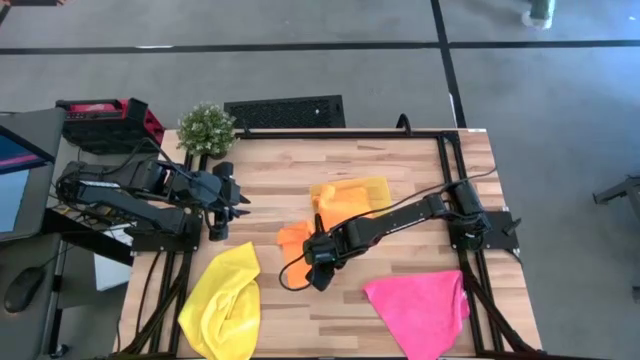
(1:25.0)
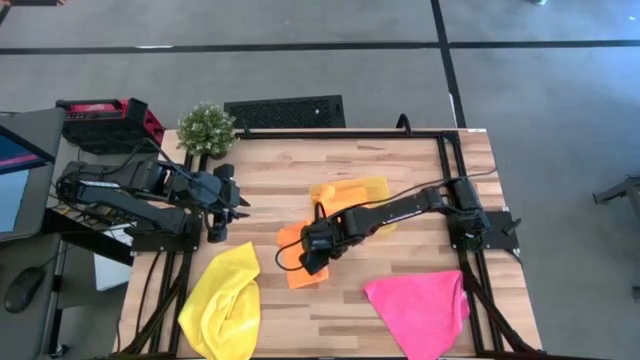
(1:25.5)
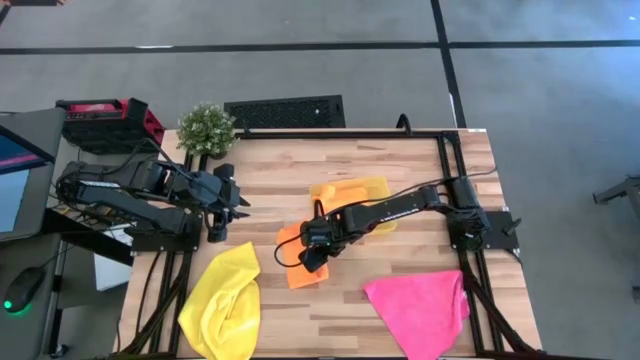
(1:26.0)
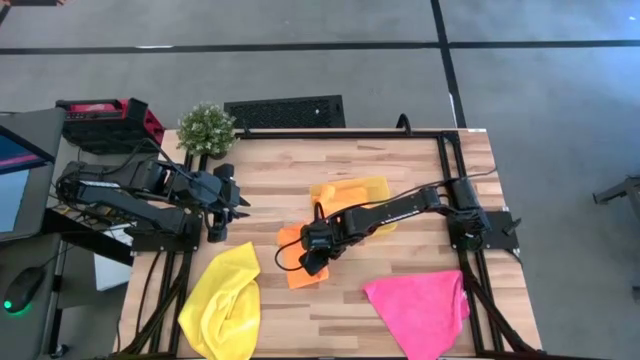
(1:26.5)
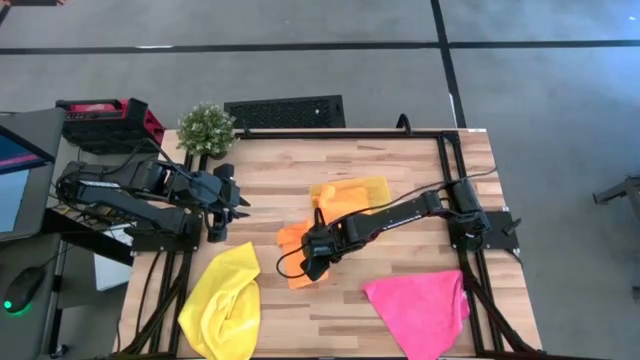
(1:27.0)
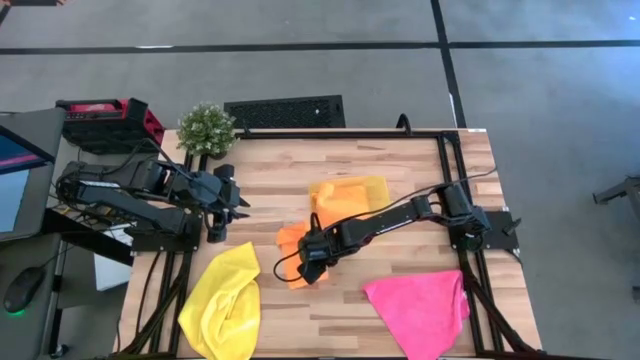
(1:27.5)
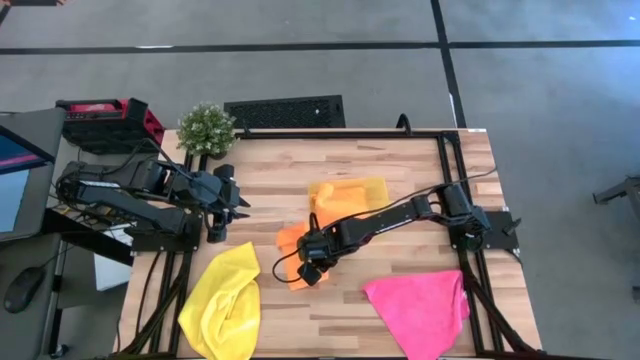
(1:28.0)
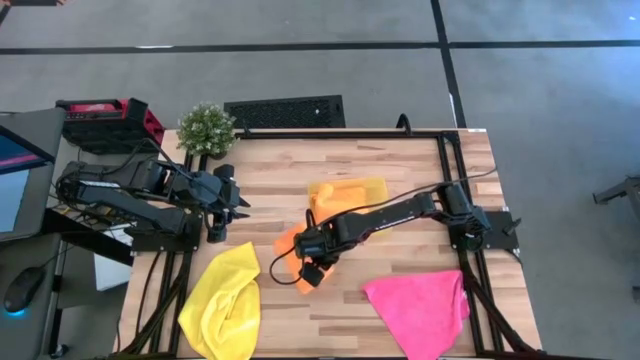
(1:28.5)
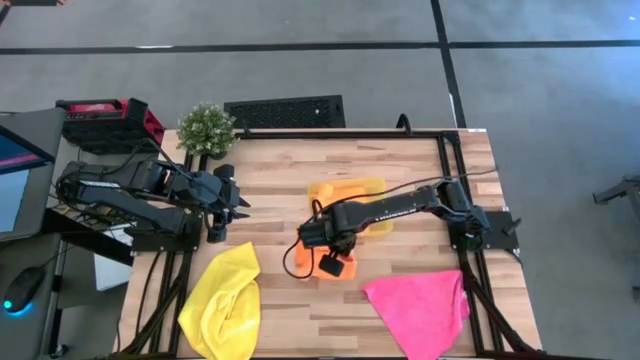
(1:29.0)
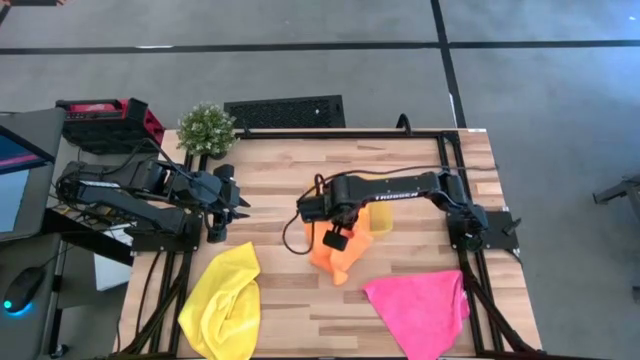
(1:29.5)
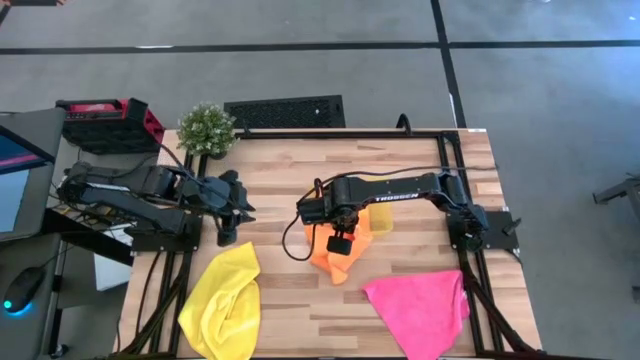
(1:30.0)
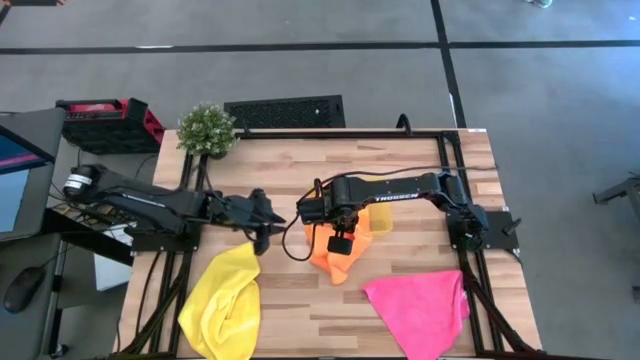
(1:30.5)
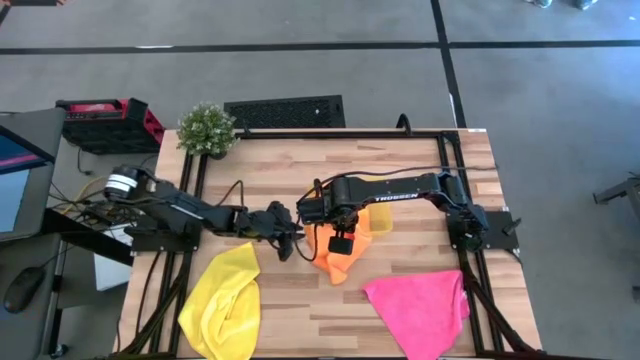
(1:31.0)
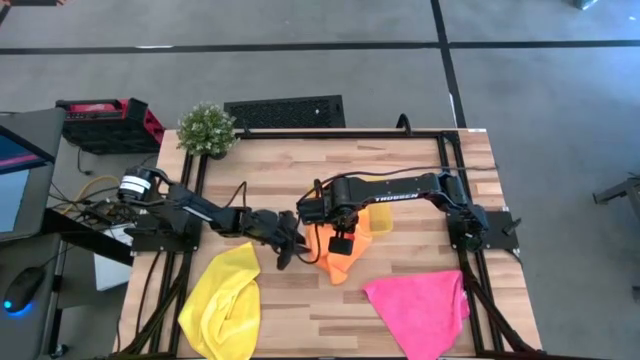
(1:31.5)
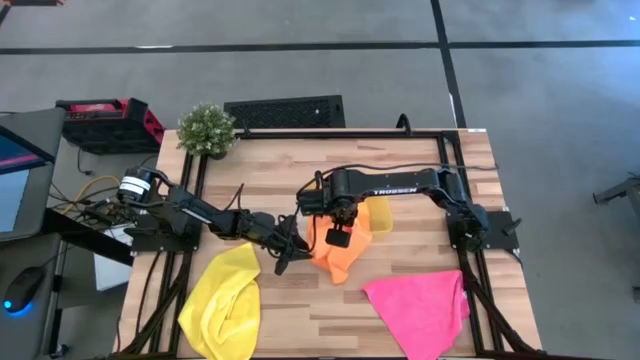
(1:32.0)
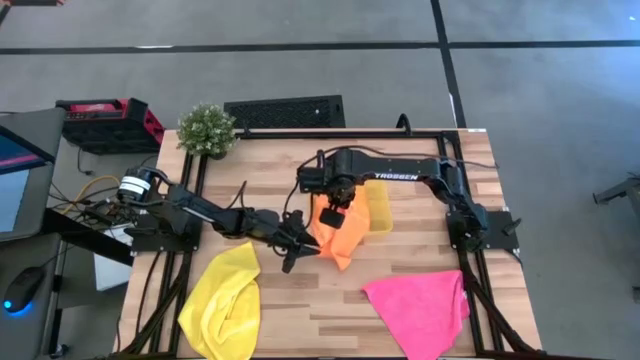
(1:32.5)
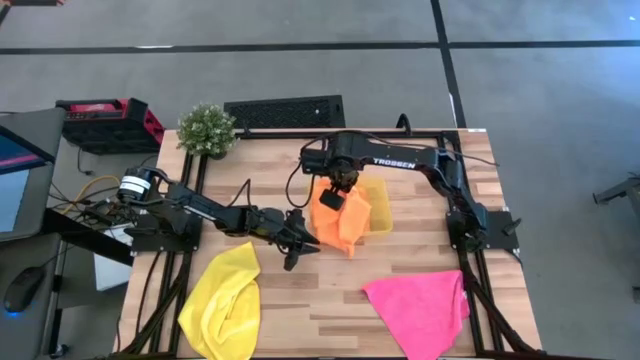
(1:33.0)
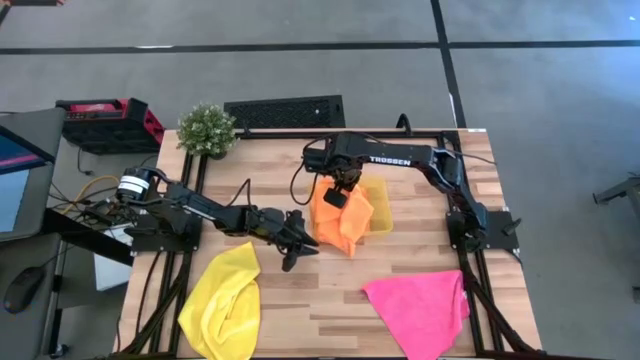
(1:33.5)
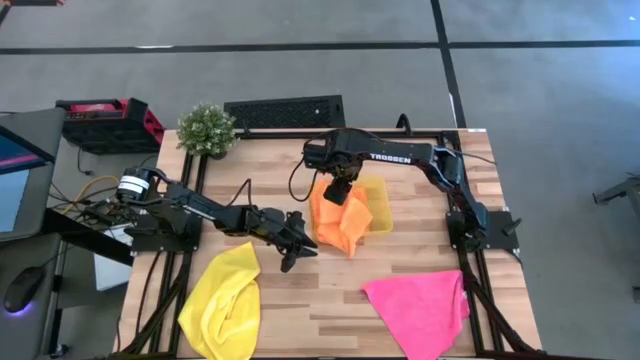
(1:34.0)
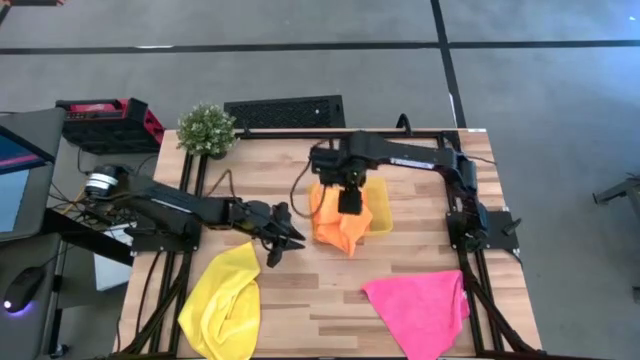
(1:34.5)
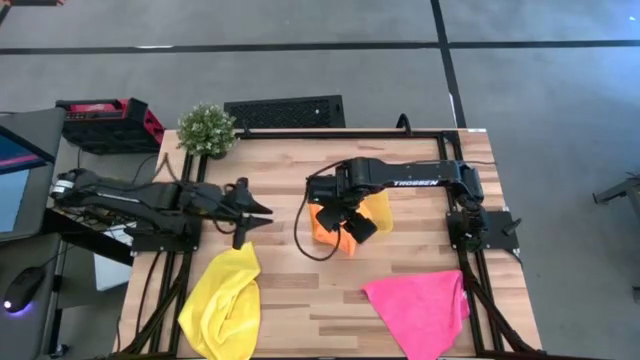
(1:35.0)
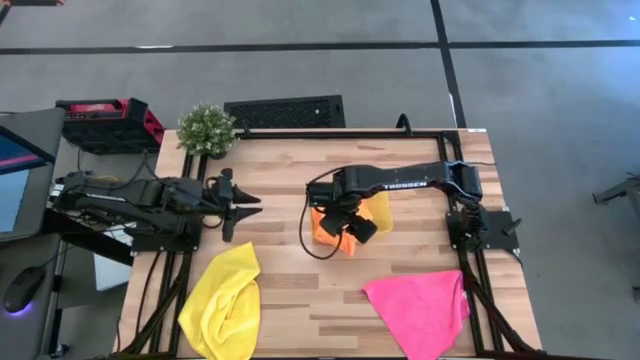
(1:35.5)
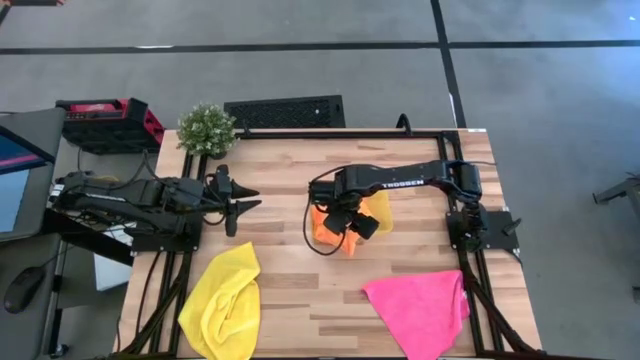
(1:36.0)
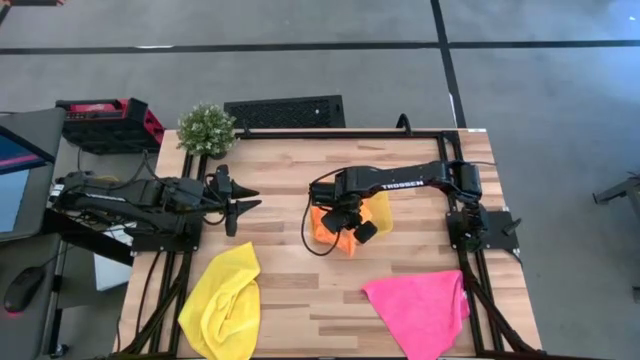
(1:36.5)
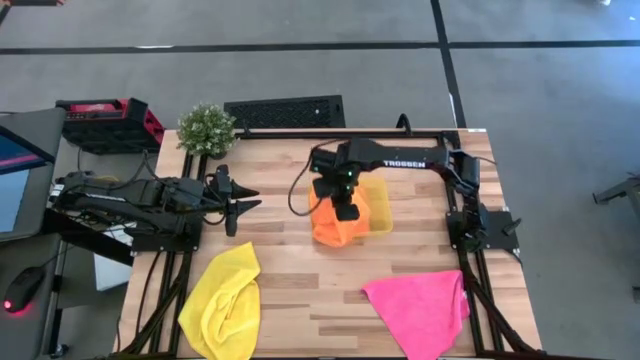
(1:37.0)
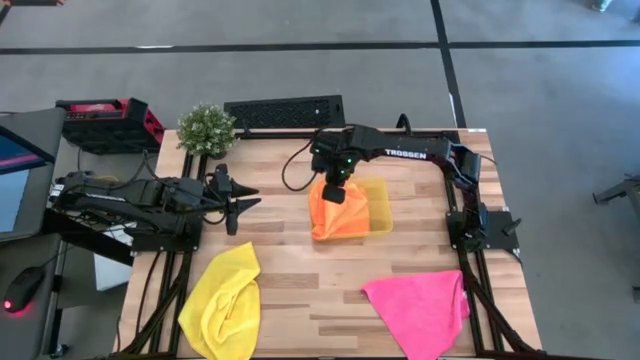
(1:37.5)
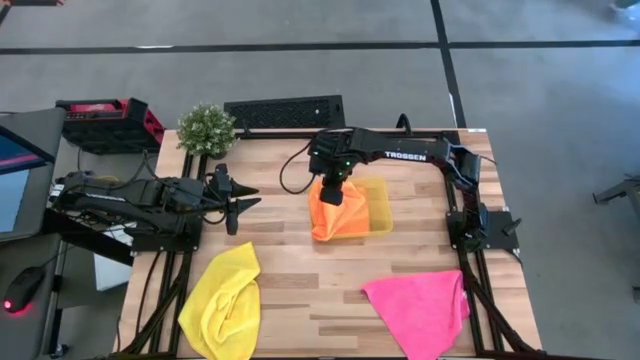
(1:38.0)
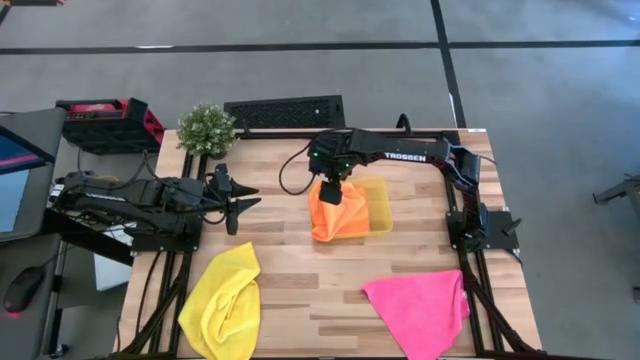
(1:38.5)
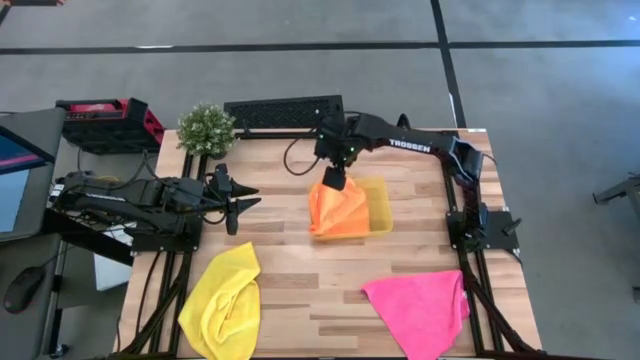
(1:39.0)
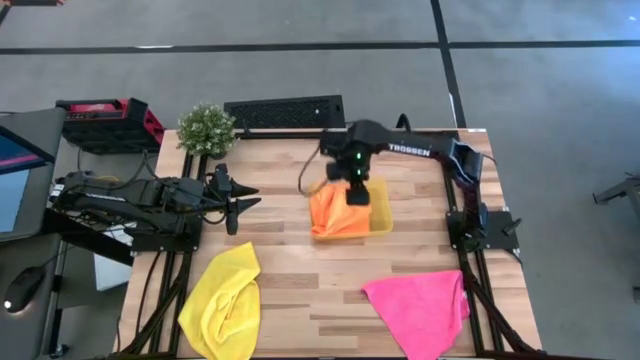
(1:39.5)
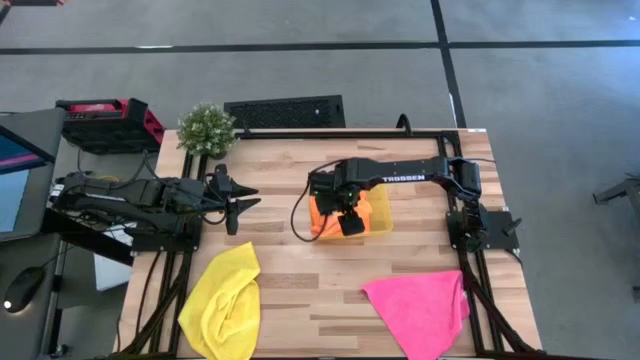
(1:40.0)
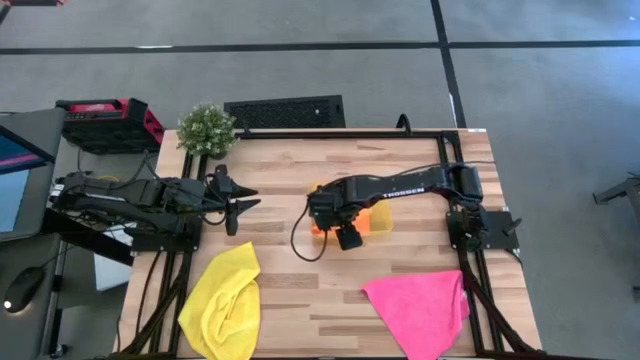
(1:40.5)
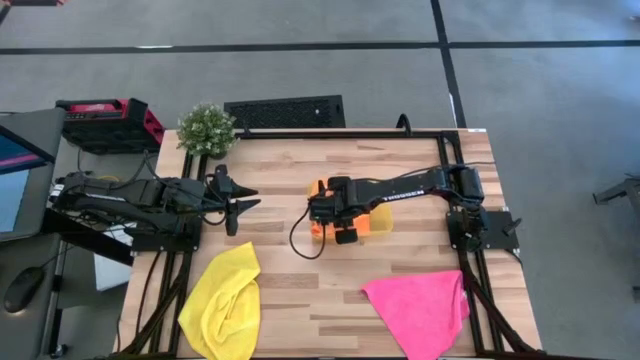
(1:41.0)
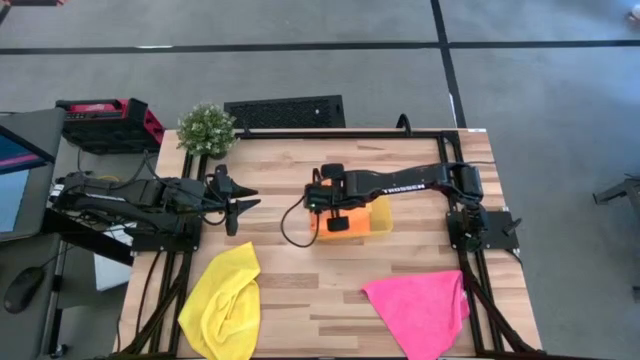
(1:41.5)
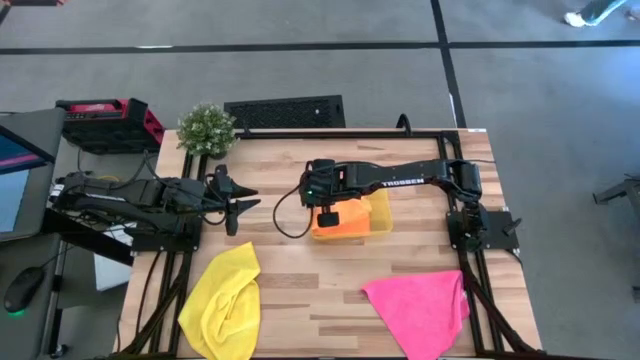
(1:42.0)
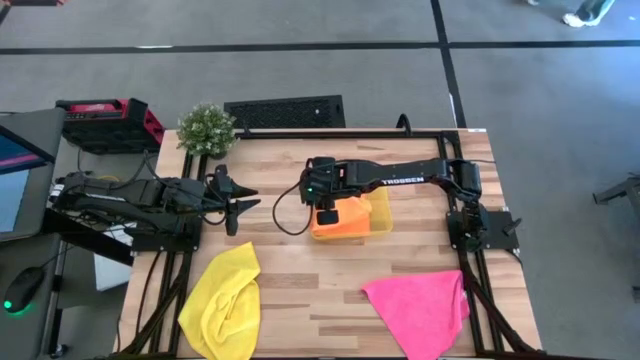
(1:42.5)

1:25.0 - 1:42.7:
Task: Fold microfiber towels
Put the folded orange microfiber towel into the yellow bin

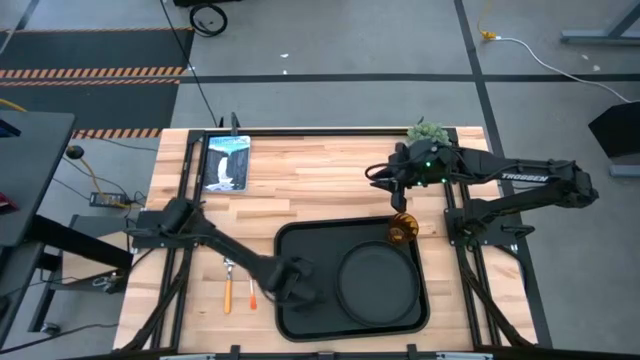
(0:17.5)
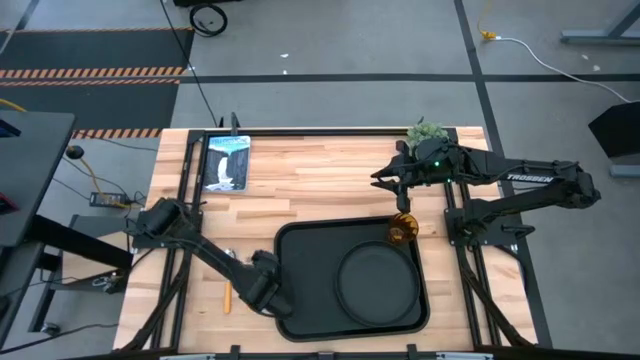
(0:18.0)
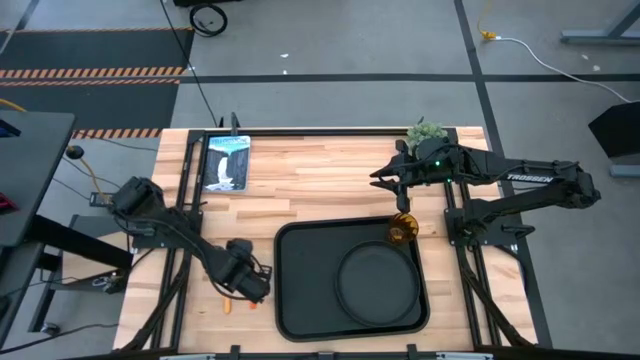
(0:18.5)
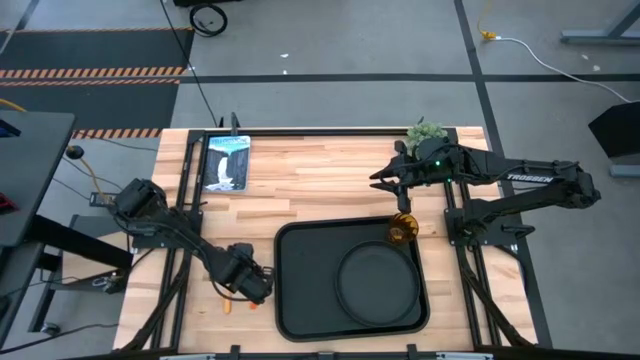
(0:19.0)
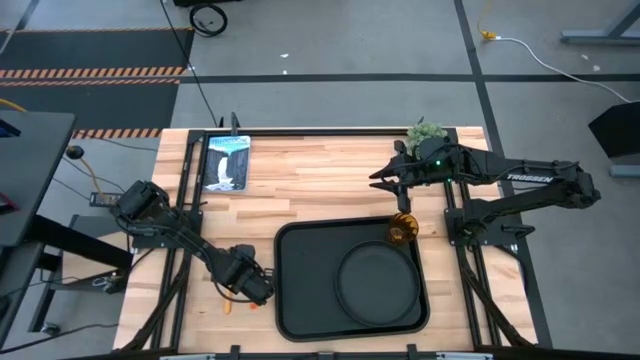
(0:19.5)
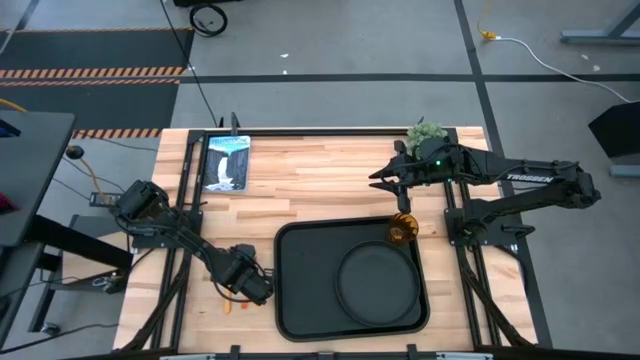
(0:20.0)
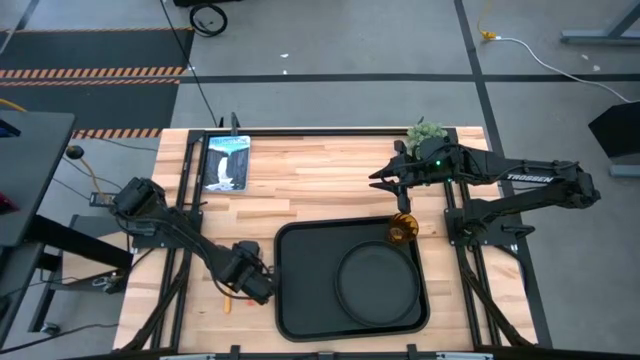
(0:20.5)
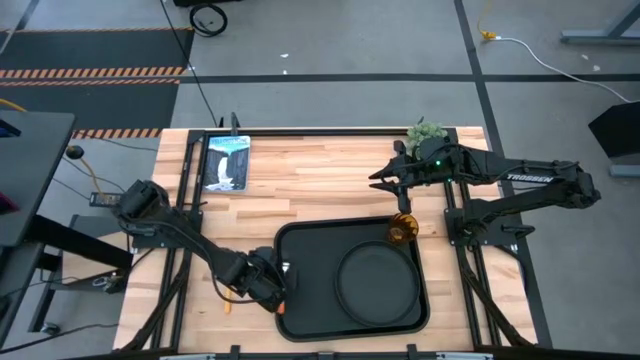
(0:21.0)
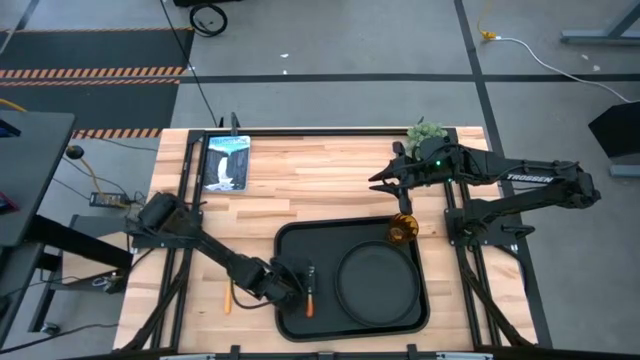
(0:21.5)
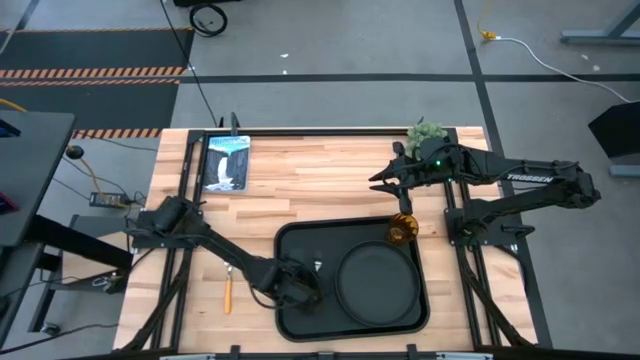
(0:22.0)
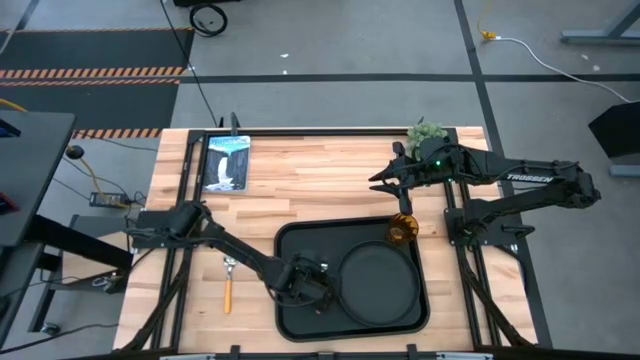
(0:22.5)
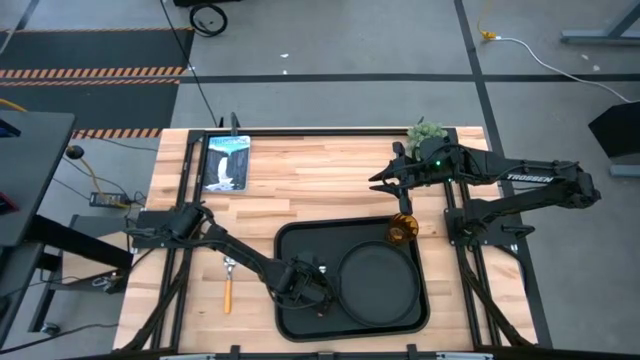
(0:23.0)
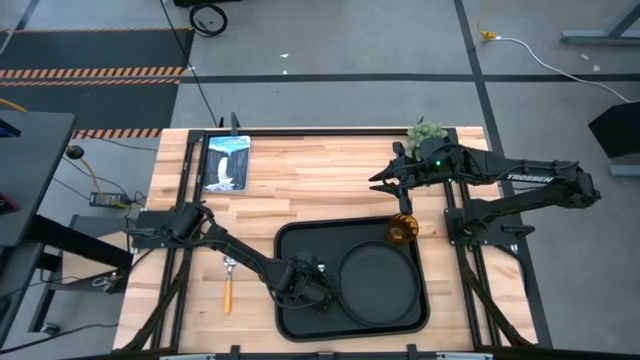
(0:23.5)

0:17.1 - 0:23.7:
Task: Pick and place plate/cup/fork/spoon on tray
Put the orange fork on the black serving tray to the left of the black plate
